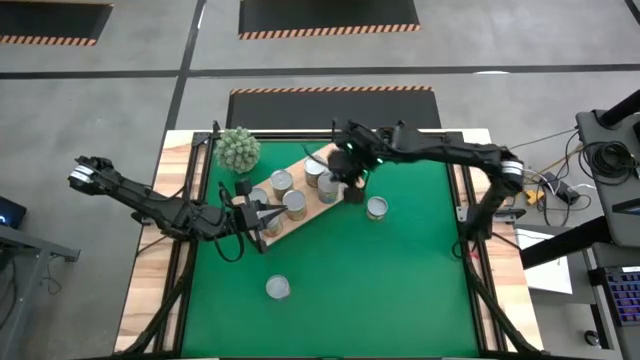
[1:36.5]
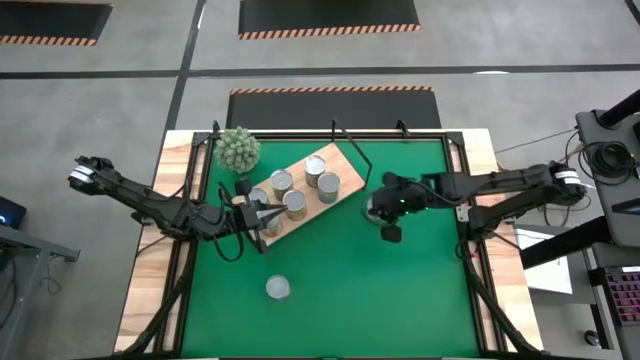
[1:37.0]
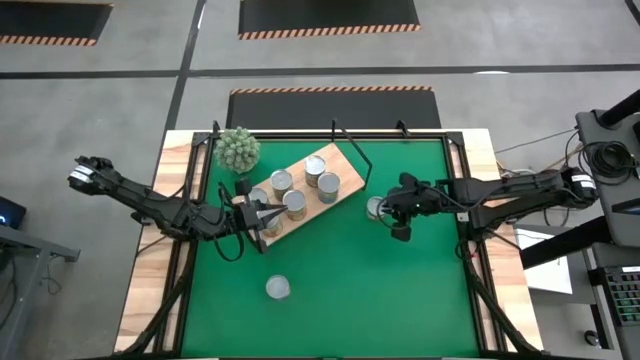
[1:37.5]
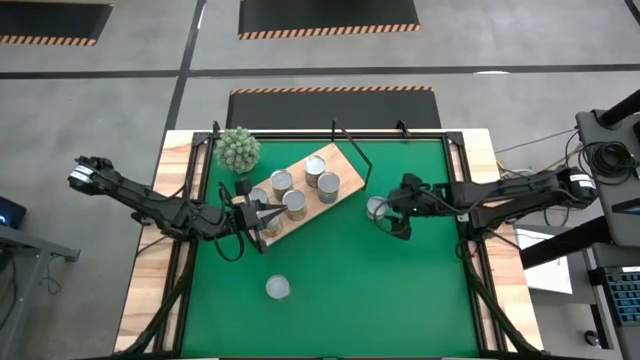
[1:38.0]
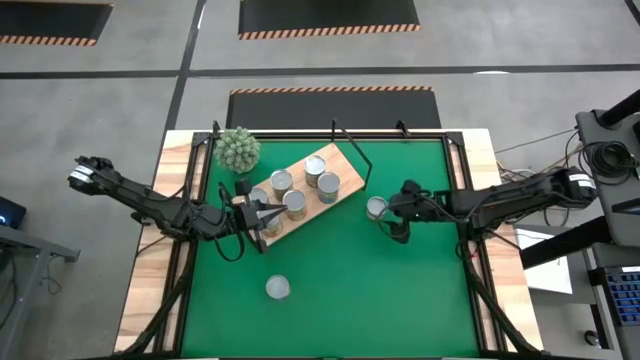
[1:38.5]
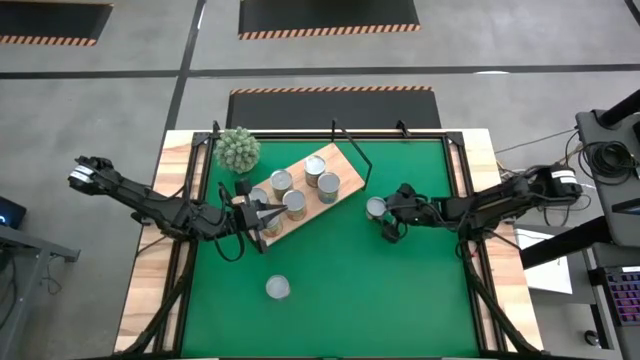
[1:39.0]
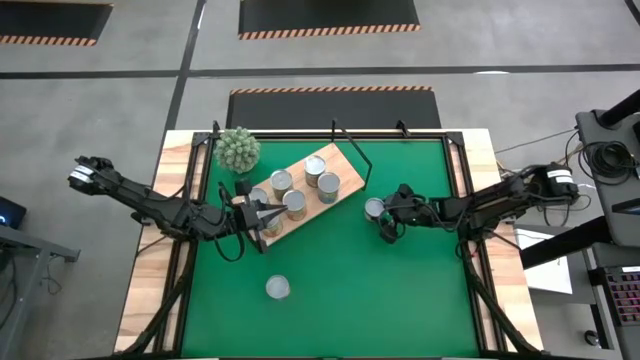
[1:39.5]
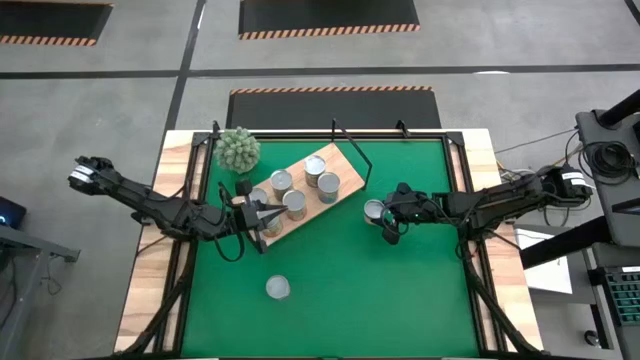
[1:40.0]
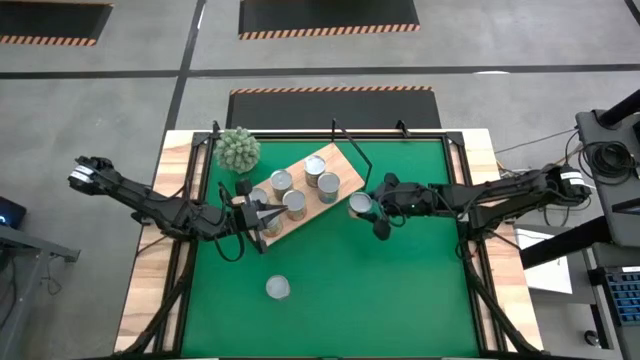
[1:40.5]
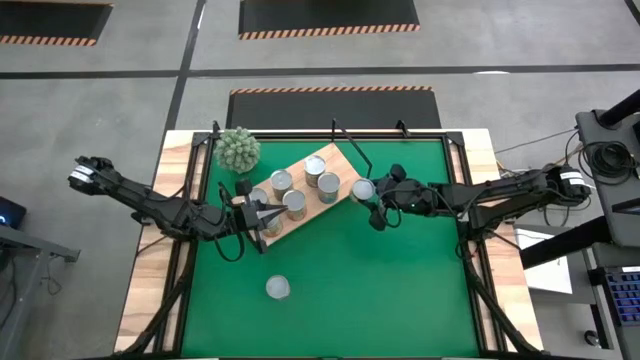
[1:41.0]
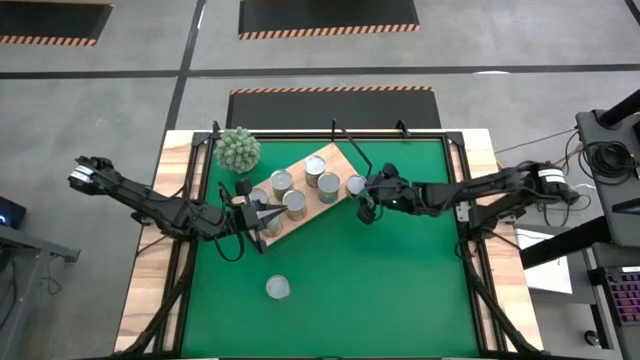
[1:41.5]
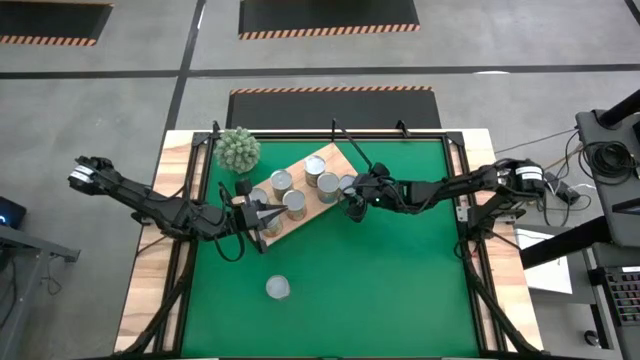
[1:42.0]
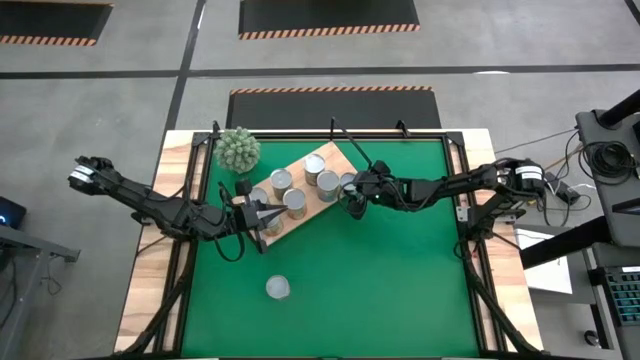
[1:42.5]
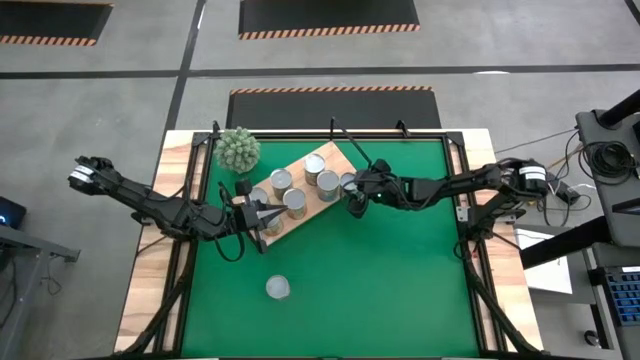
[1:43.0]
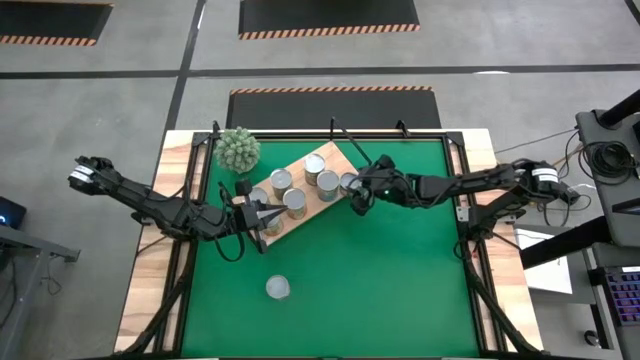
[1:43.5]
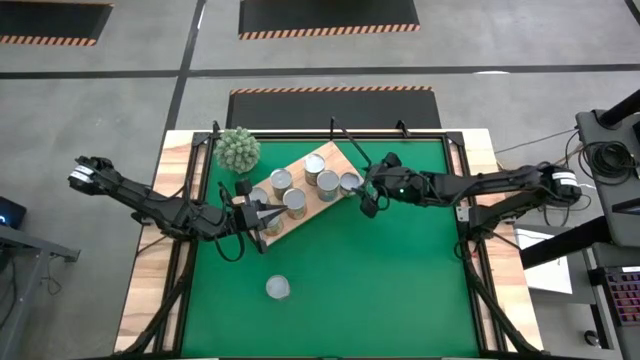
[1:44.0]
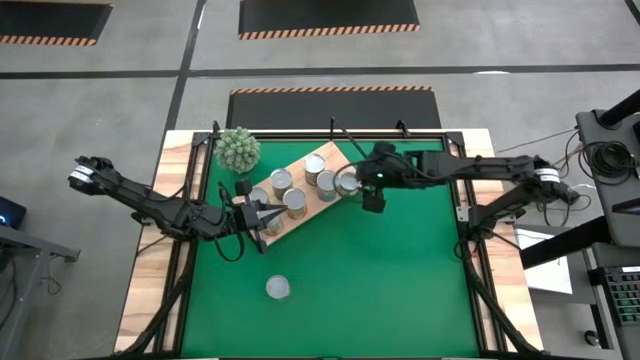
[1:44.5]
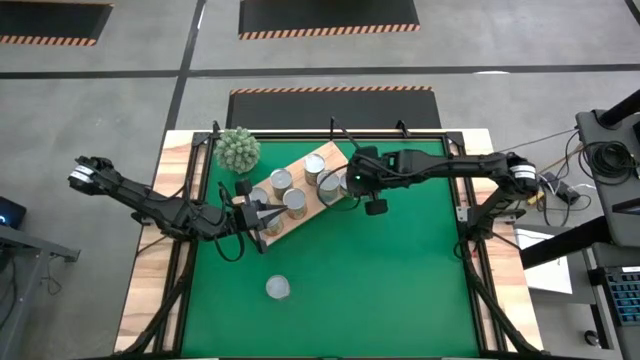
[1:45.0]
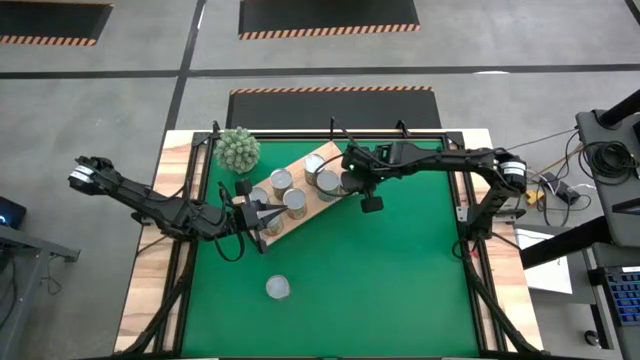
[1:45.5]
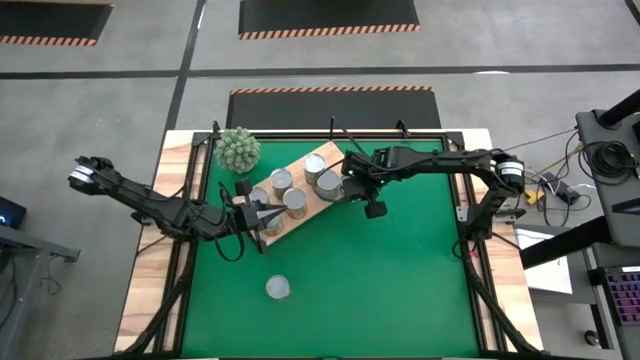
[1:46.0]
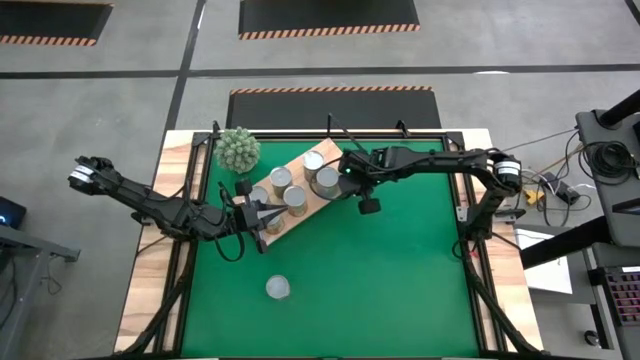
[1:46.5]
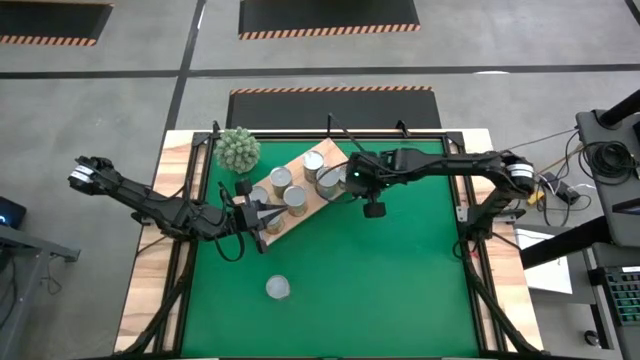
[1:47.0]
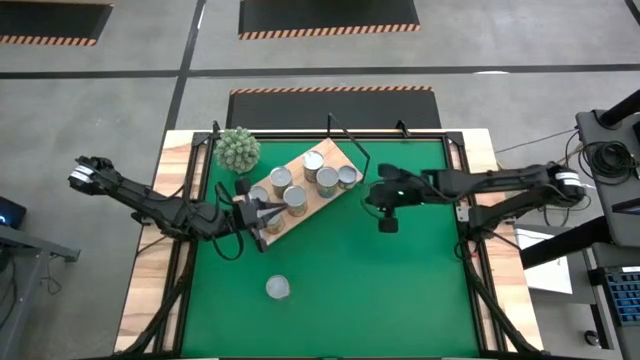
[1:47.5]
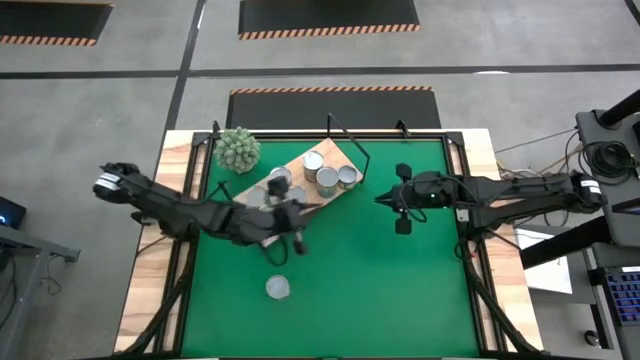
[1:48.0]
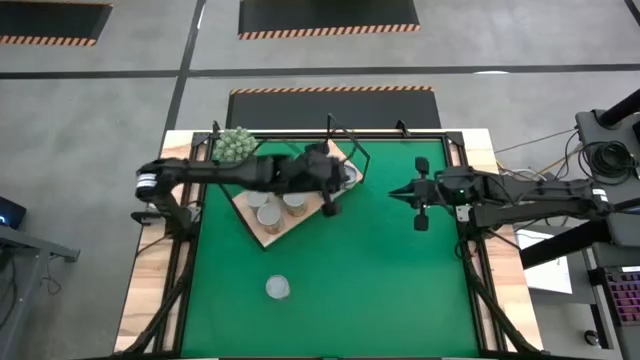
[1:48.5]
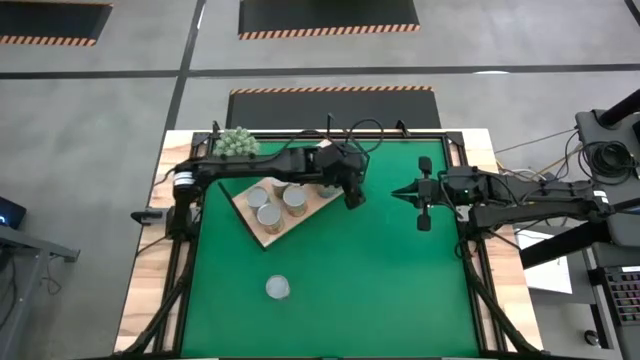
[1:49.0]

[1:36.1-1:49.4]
Task: Pick and place cans onto a shelf
Put the canned sliced peaches on the shelf

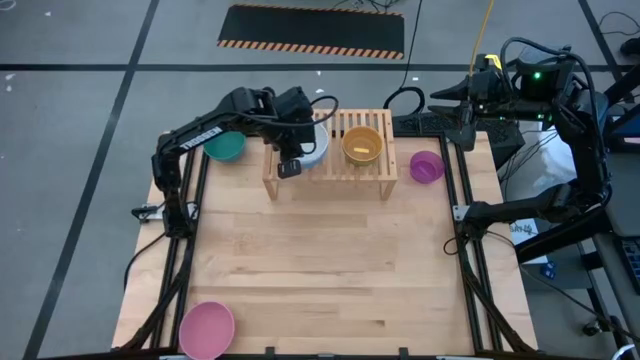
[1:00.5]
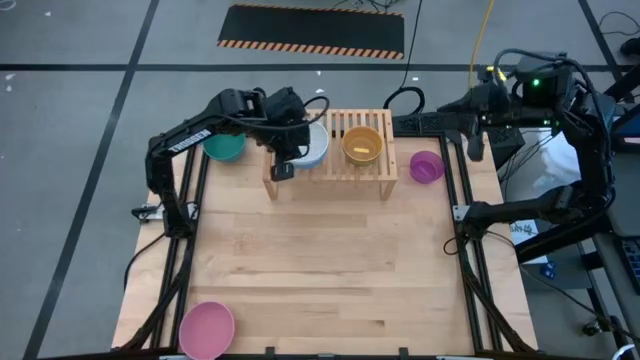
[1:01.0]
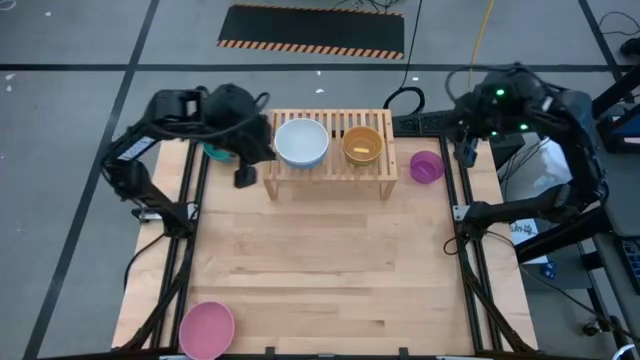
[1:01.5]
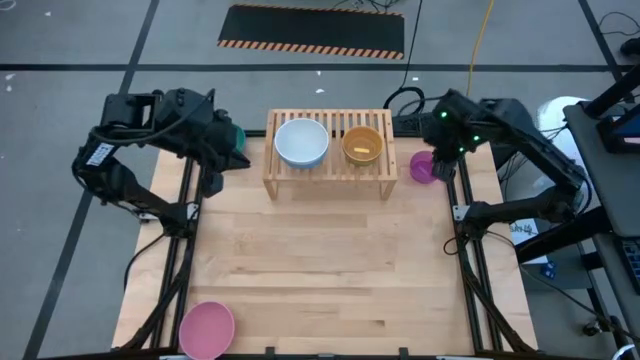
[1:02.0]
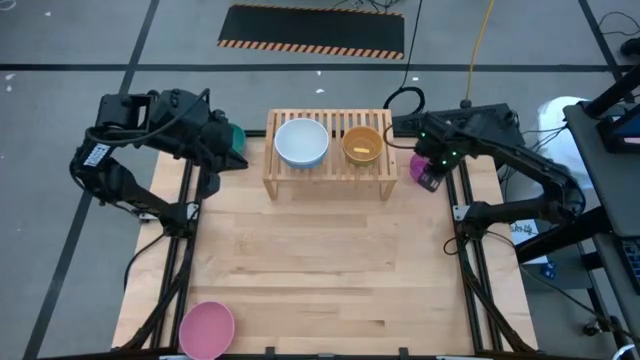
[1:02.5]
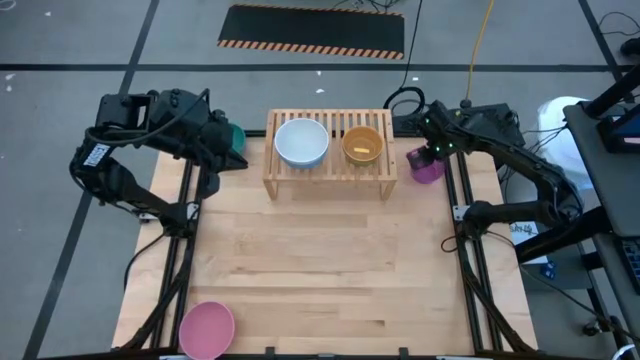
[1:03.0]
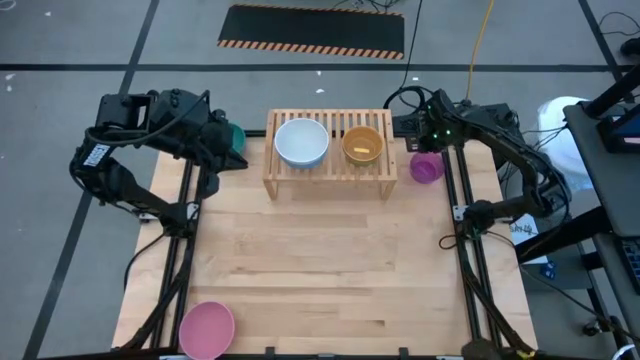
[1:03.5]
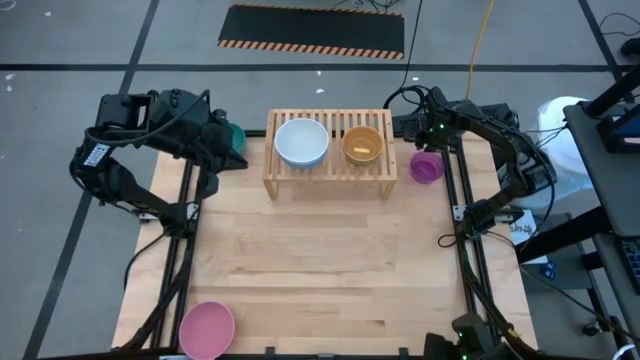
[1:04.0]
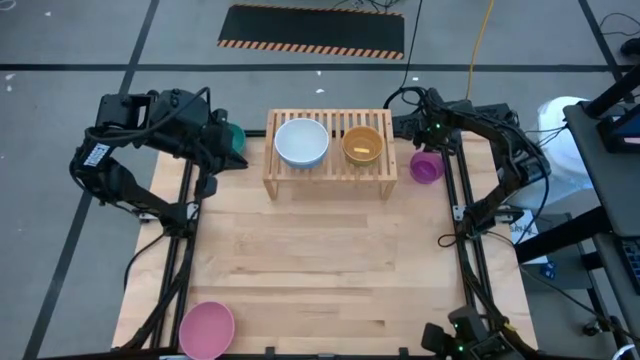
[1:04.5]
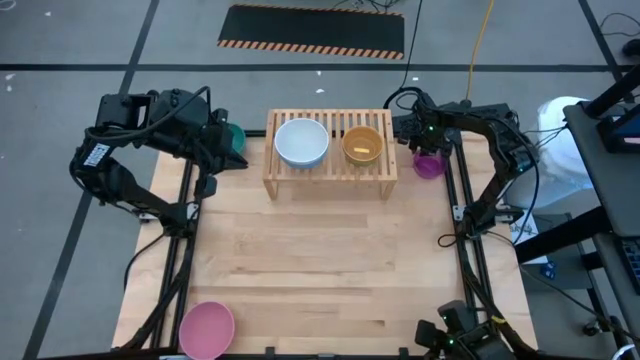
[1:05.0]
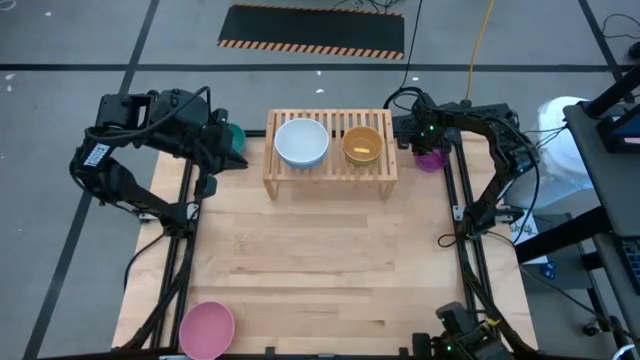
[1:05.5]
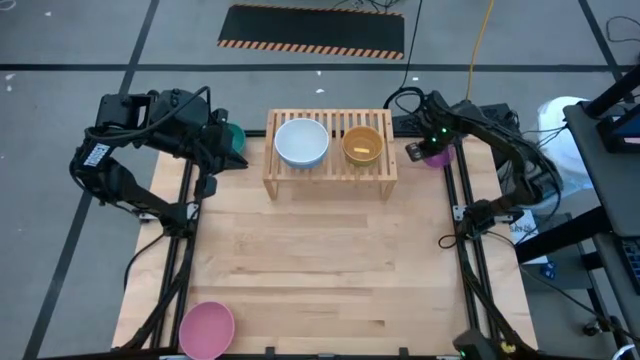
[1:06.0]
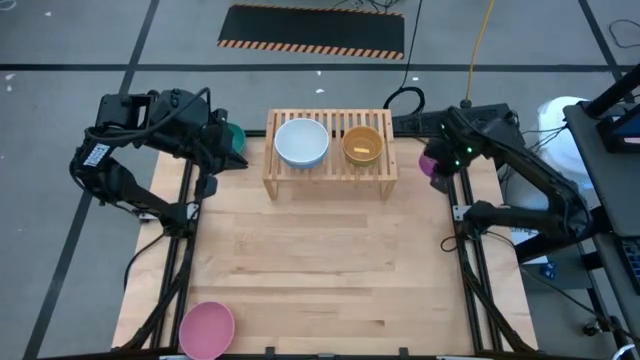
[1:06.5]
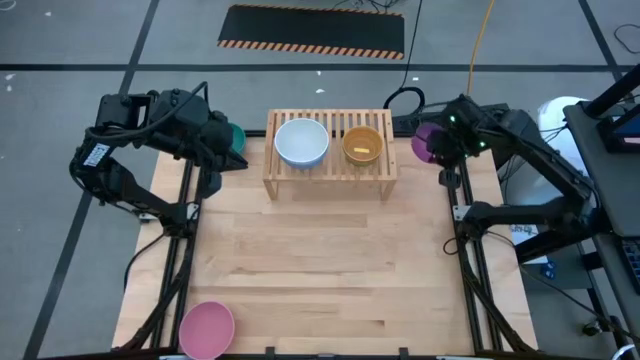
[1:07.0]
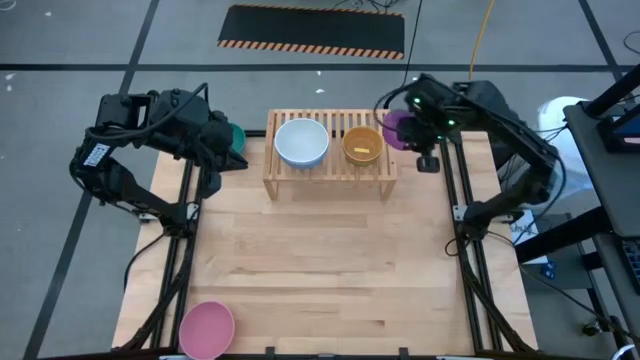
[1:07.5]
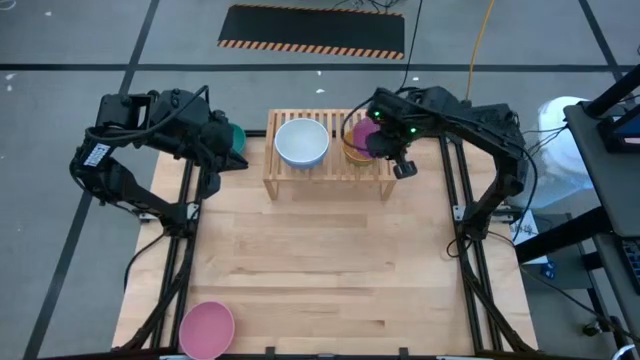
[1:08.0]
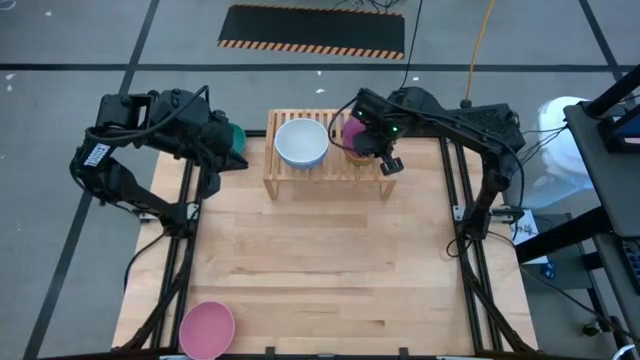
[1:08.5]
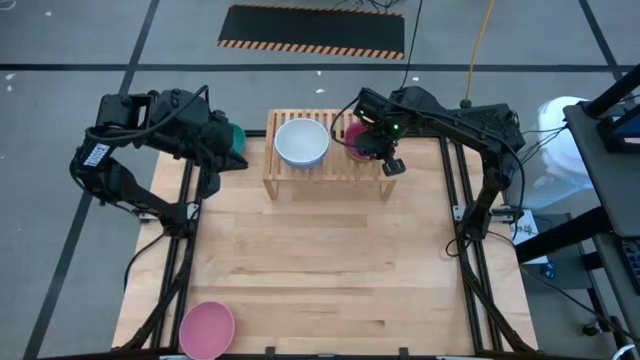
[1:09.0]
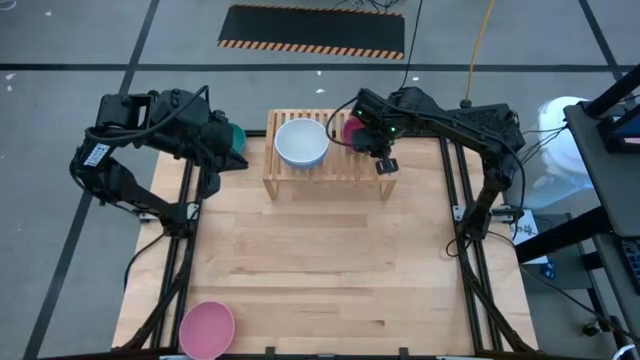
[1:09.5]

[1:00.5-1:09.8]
Task: Place and stack bowls onto a shelf
Stack the purple bowl on top of the yellow bowl on the shelf
